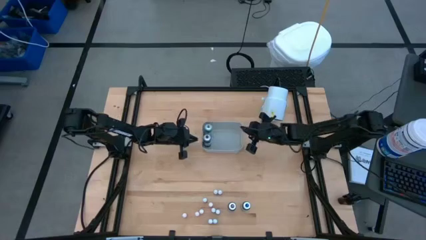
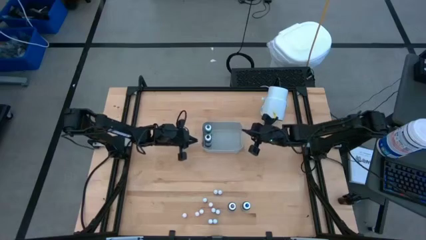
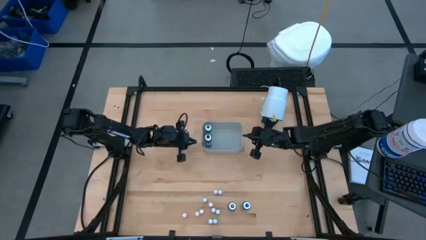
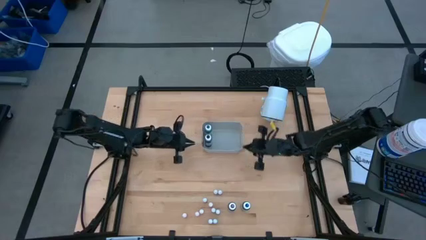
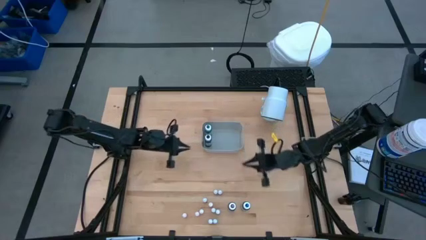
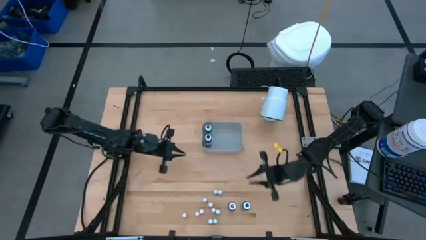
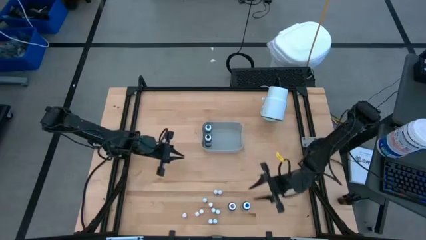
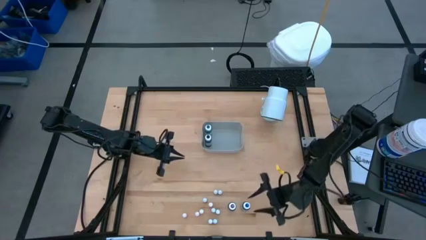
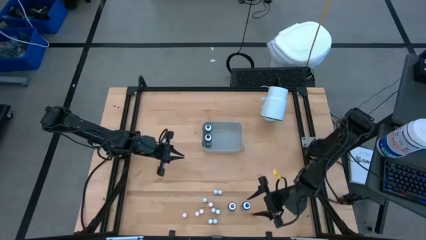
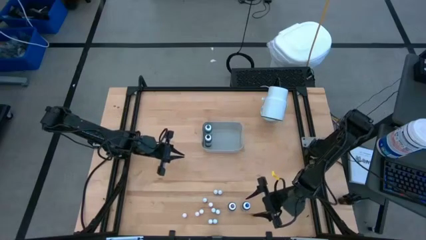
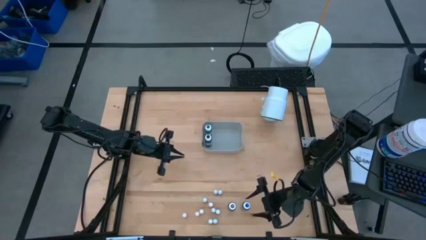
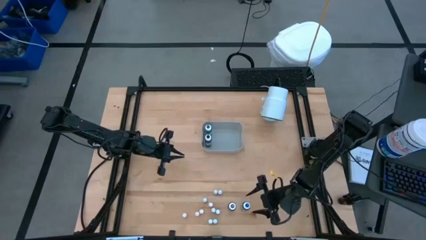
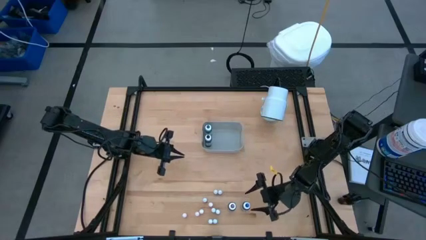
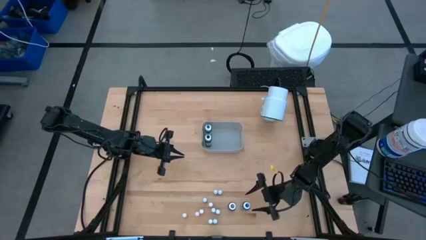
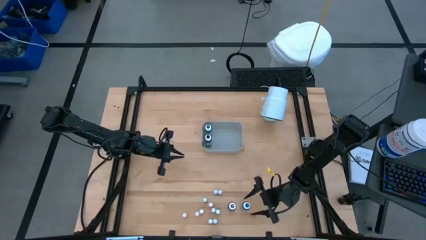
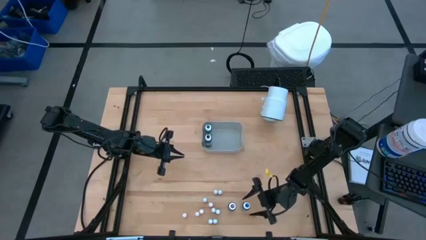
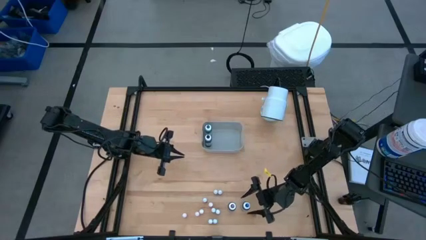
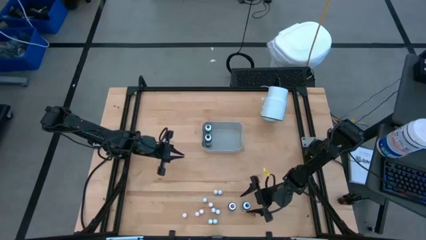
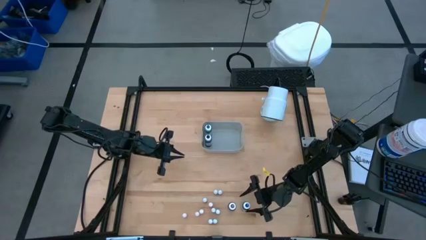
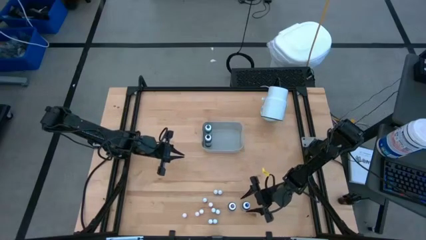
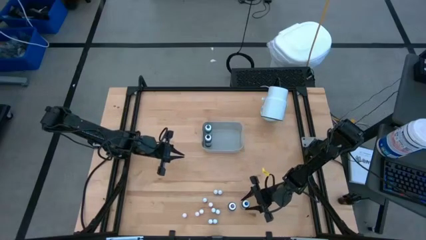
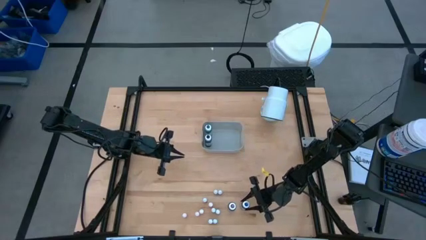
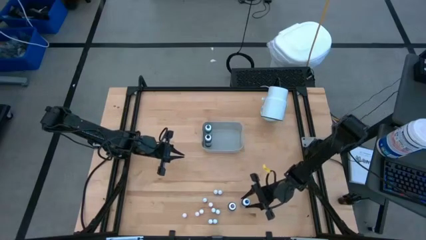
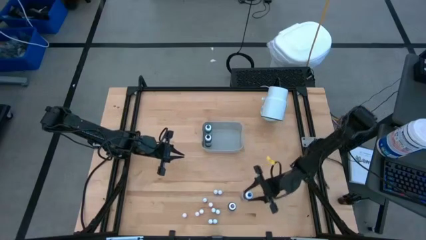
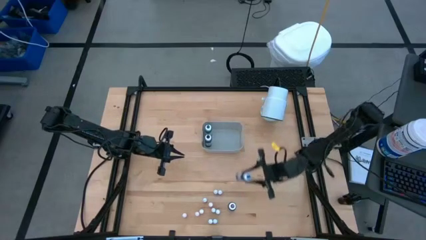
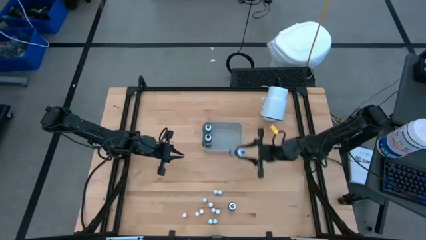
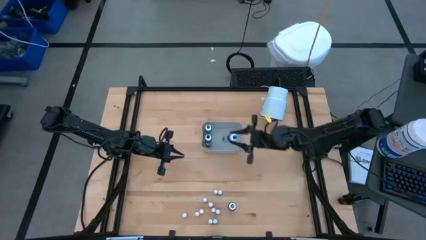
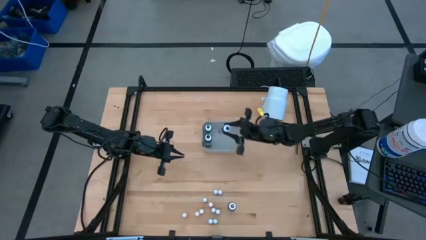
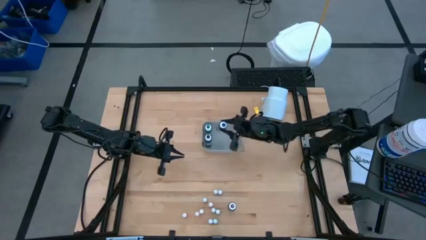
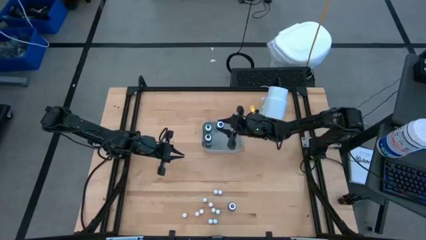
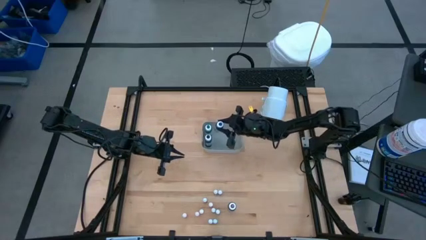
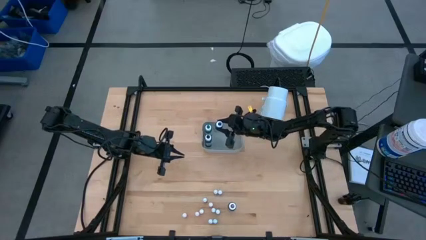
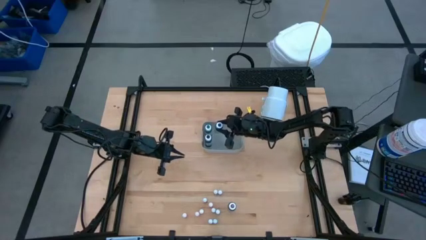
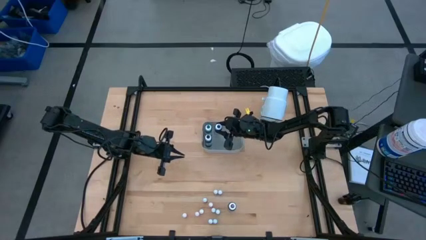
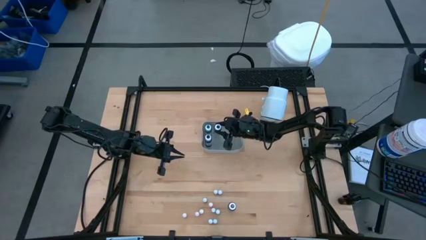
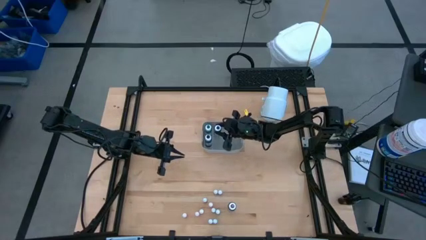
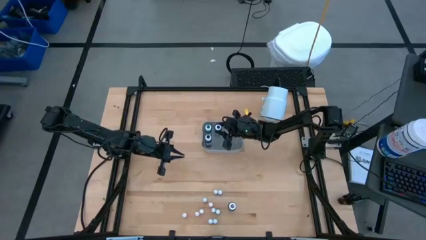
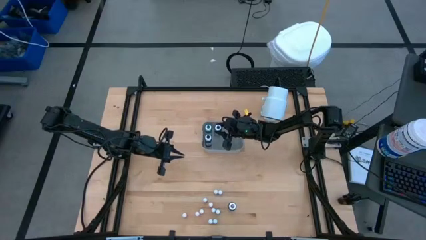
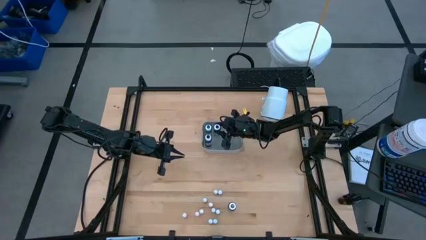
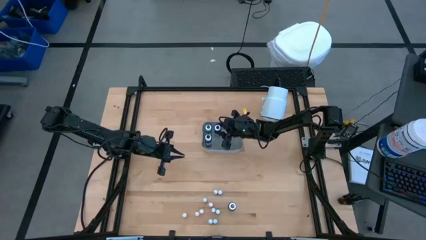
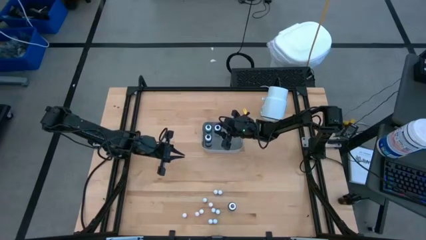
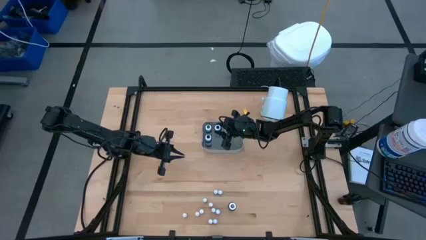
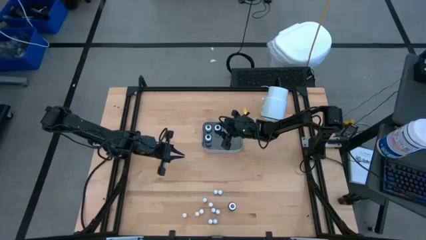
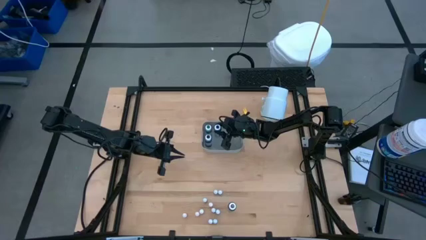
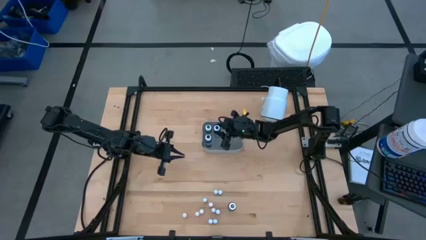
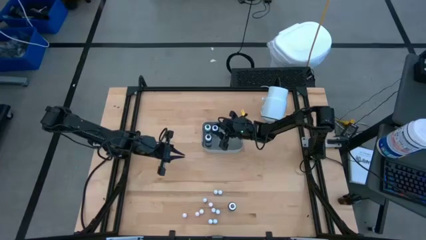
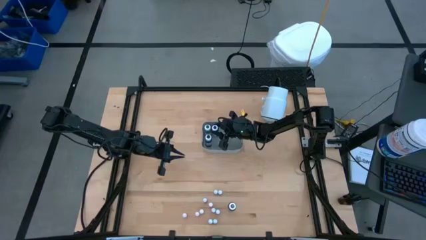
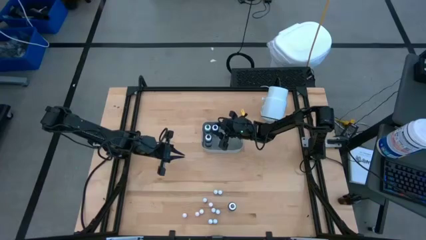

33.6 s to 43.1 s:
Task: Pick & Place food coloring
Put the large blue food coloring bottle into the gray bin

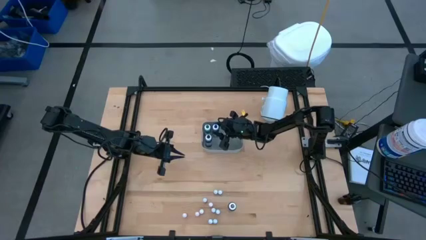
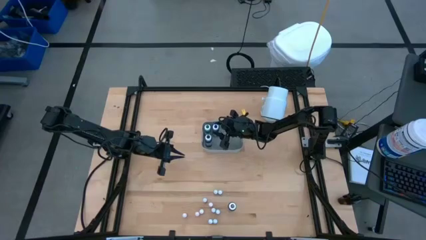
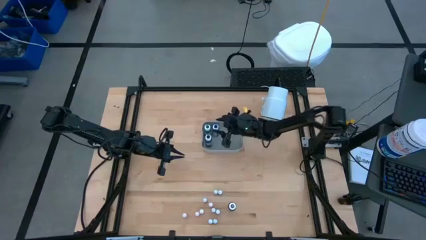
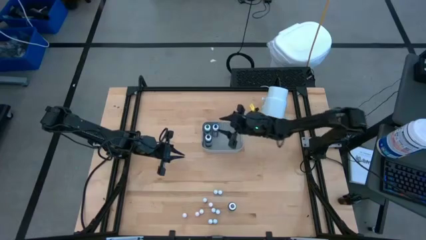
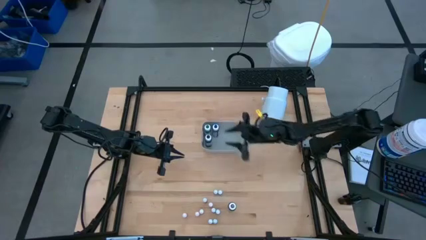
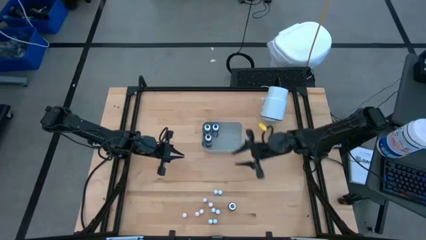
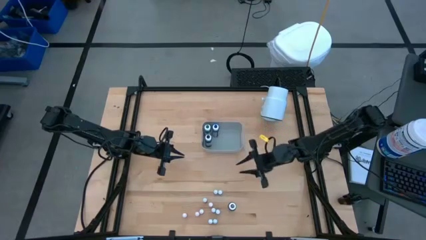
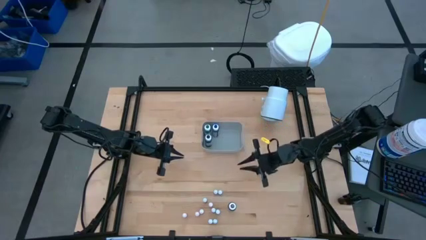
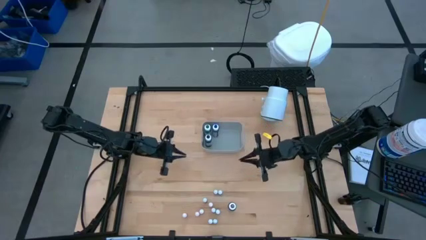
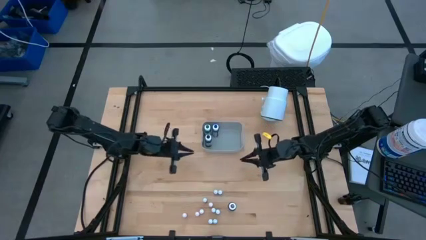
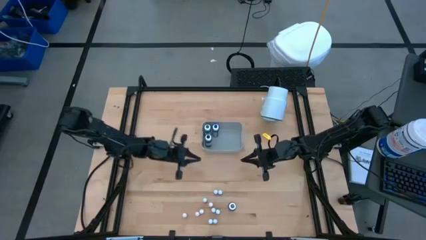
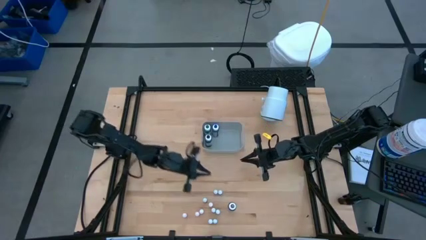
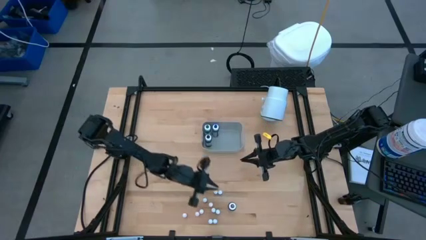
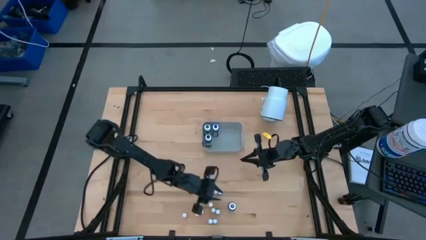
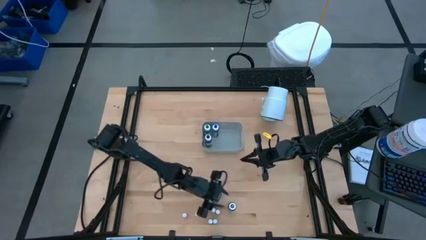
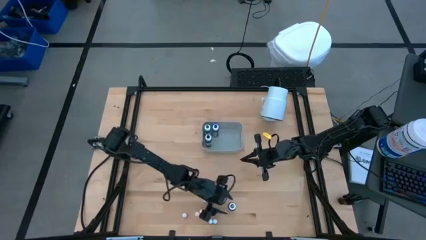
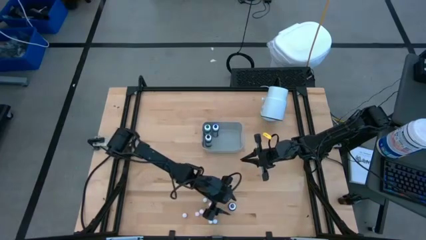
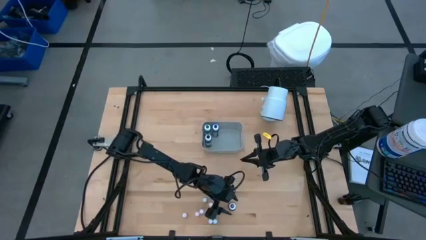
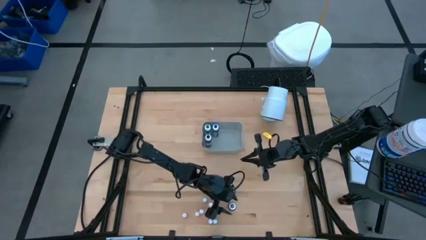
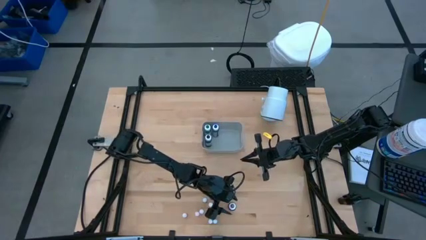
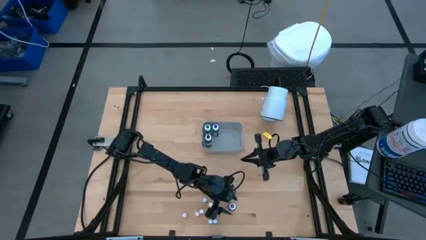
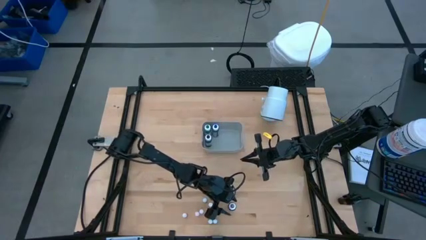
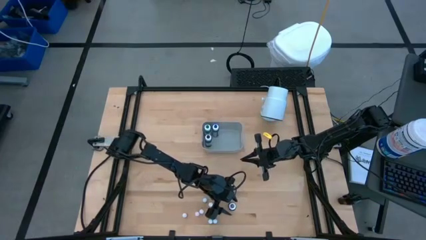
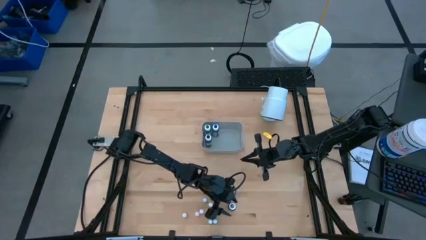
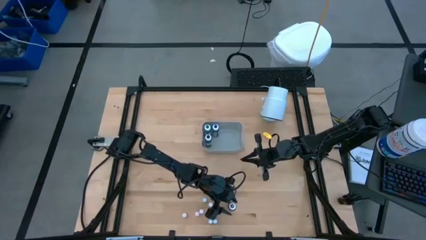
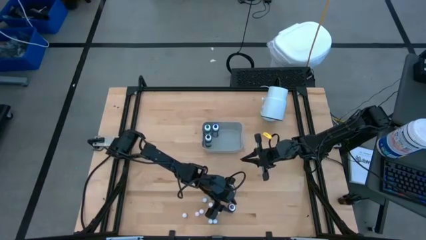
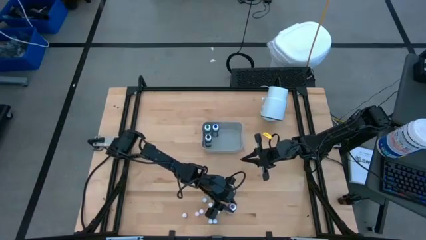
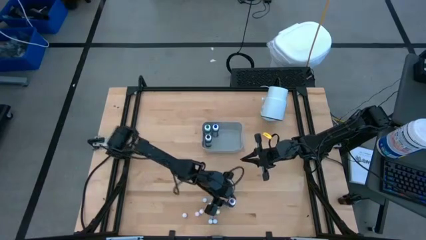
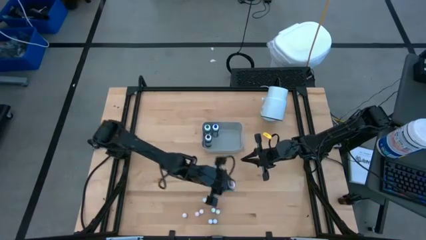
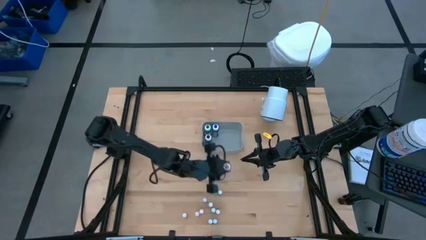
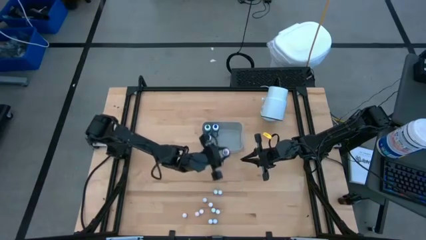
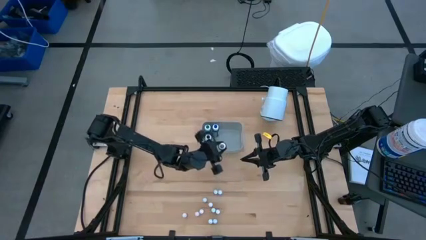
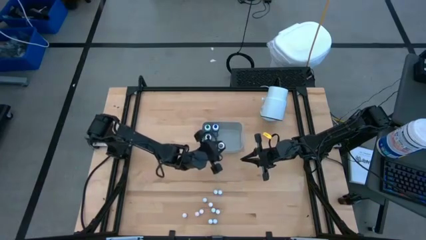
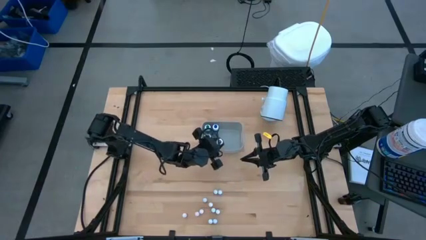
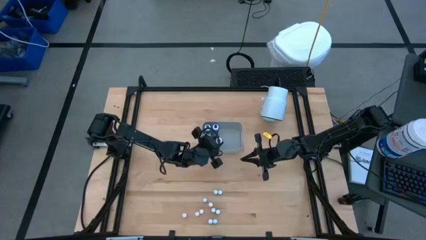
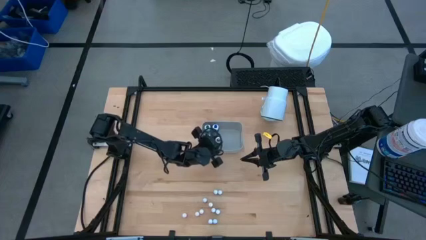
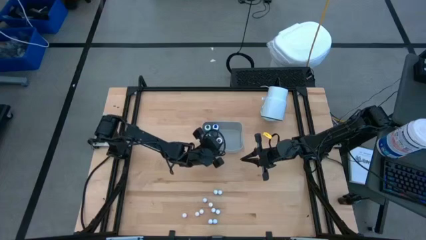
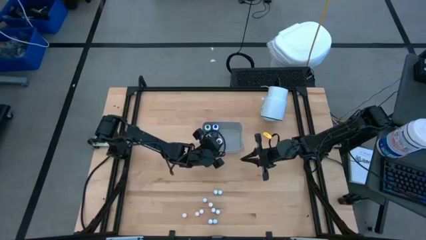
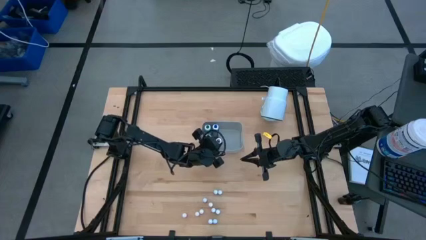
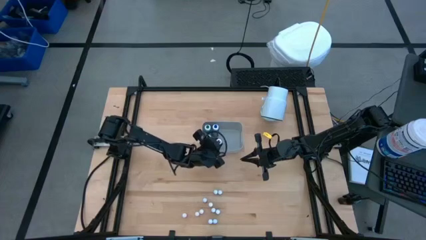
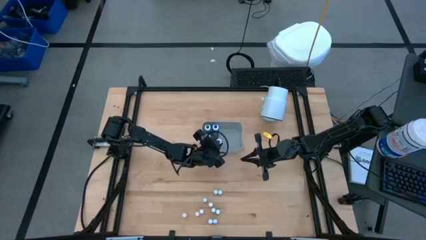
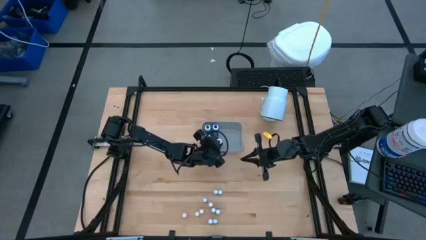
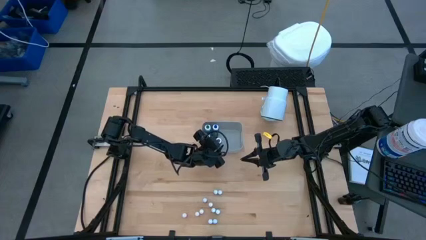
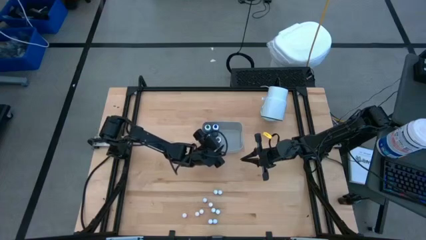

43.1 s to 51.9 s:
Put the large violet food coloring bottle into the gray bin
